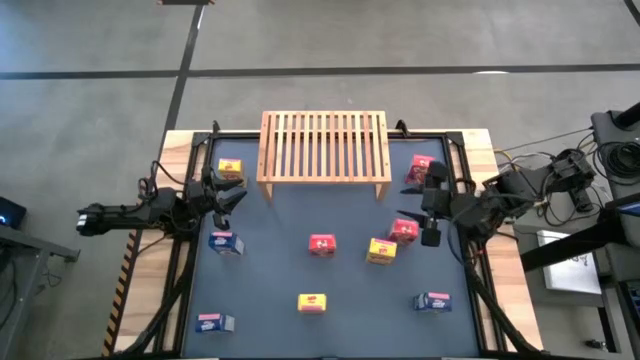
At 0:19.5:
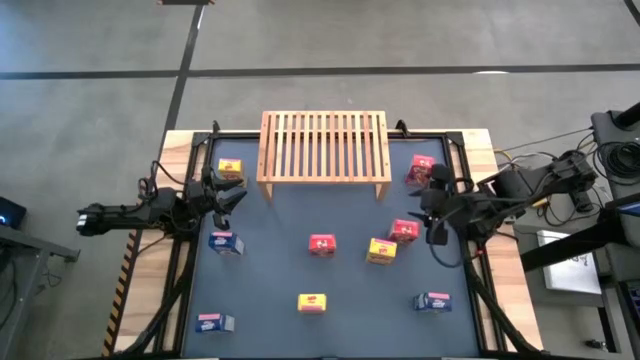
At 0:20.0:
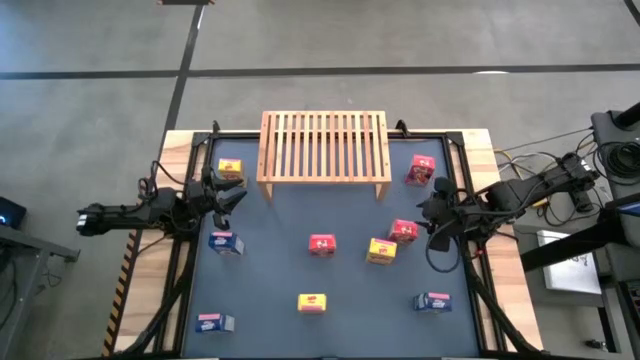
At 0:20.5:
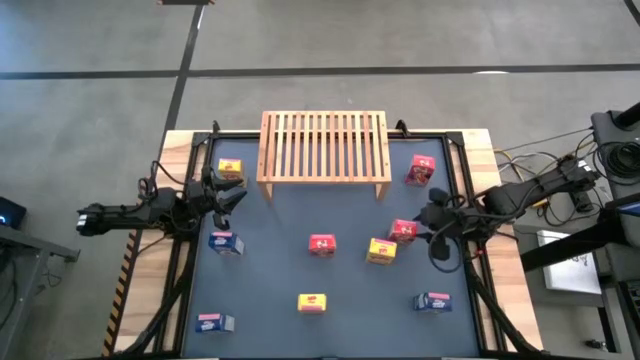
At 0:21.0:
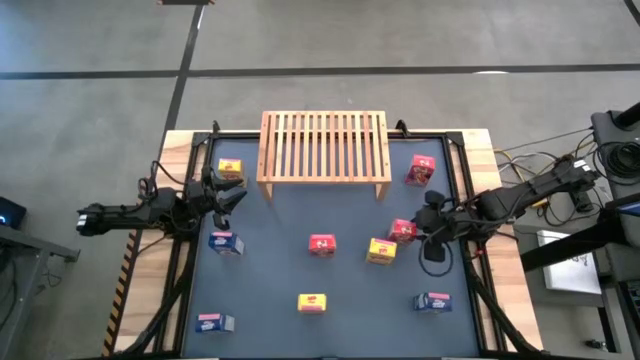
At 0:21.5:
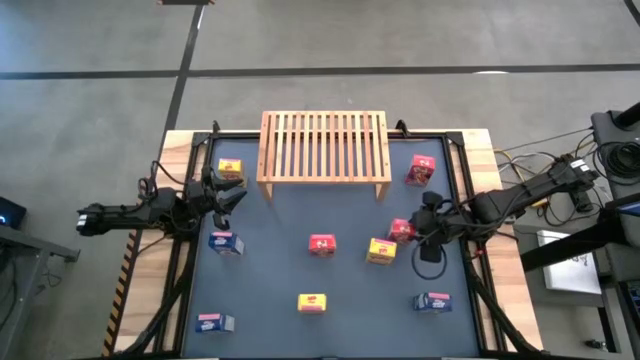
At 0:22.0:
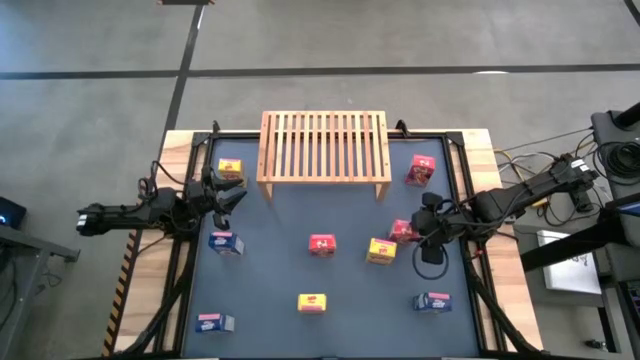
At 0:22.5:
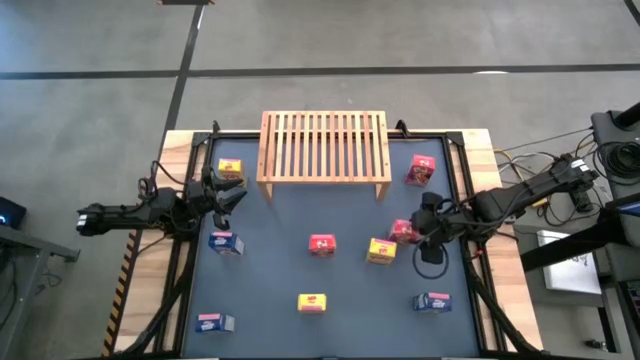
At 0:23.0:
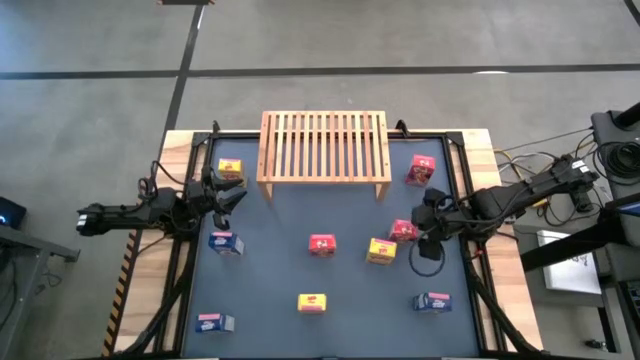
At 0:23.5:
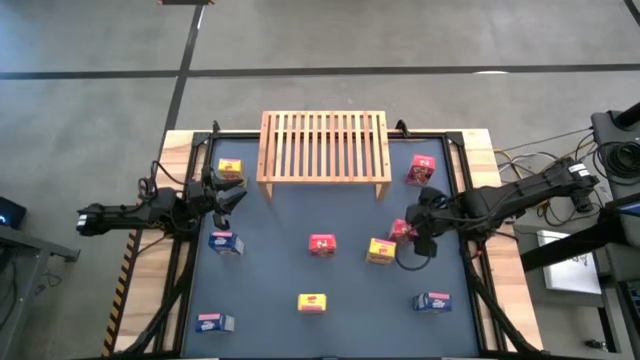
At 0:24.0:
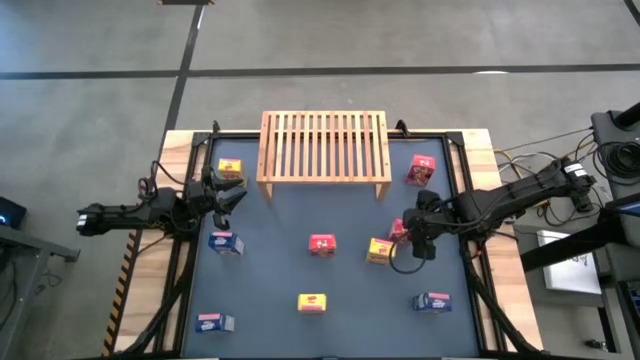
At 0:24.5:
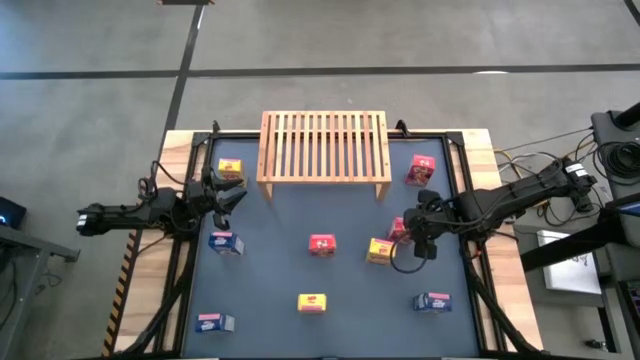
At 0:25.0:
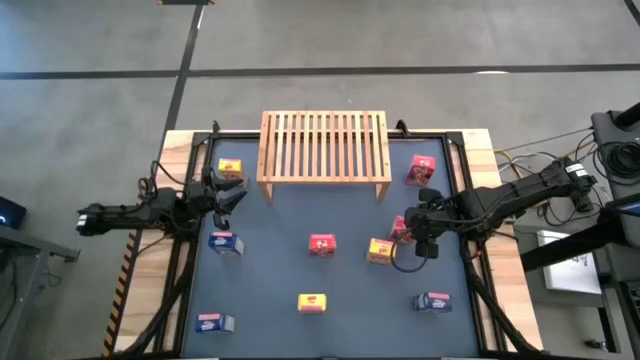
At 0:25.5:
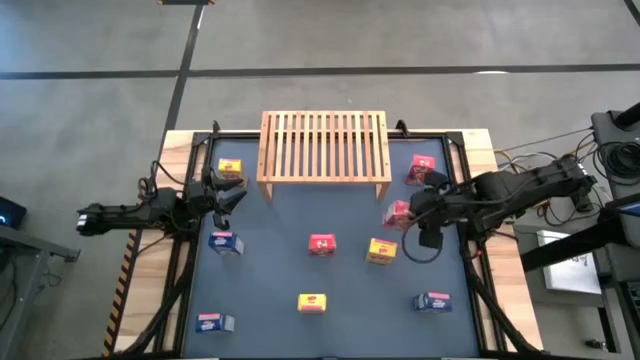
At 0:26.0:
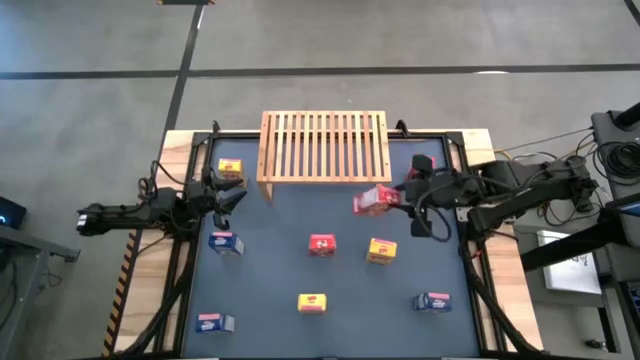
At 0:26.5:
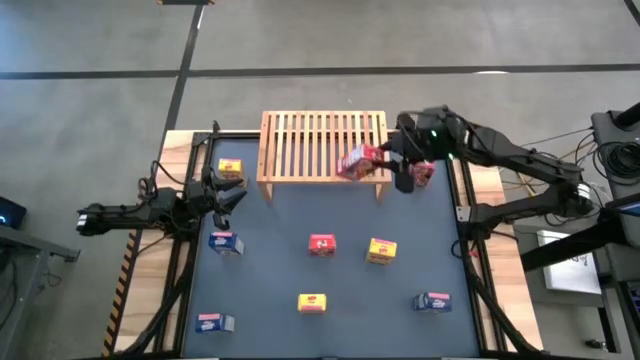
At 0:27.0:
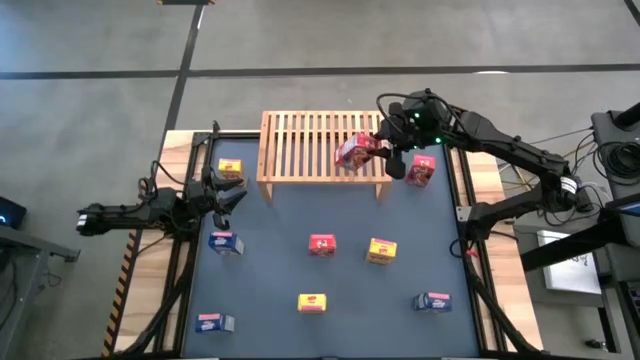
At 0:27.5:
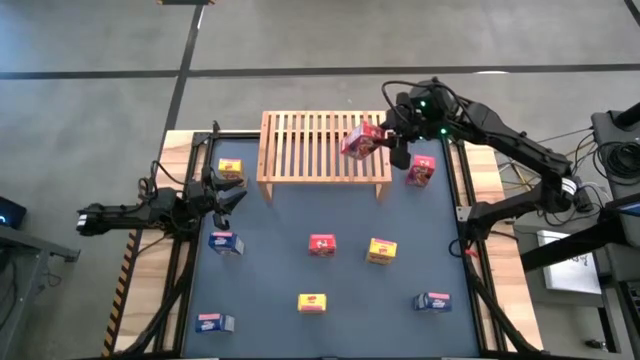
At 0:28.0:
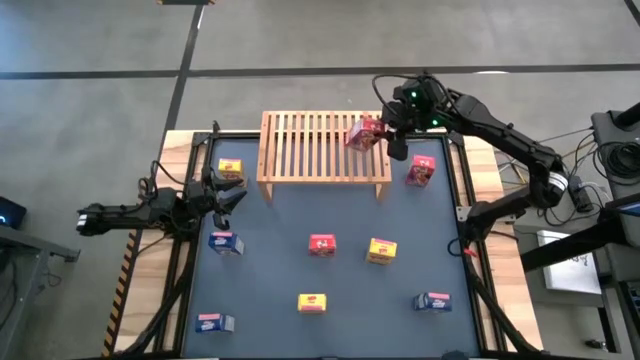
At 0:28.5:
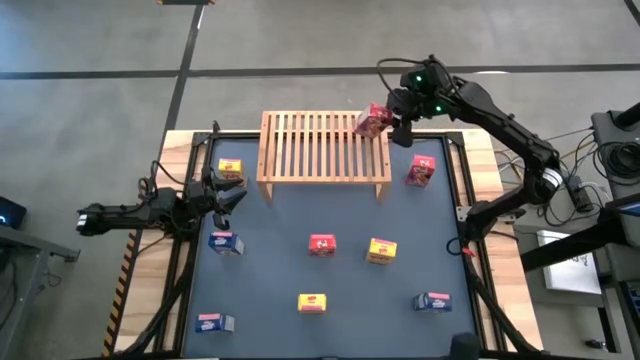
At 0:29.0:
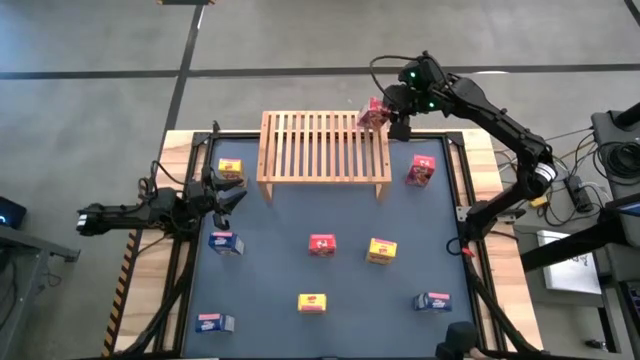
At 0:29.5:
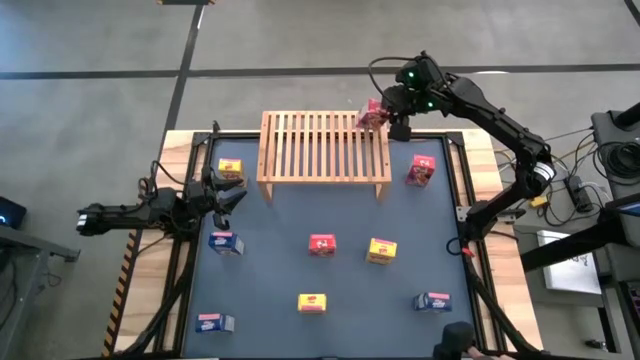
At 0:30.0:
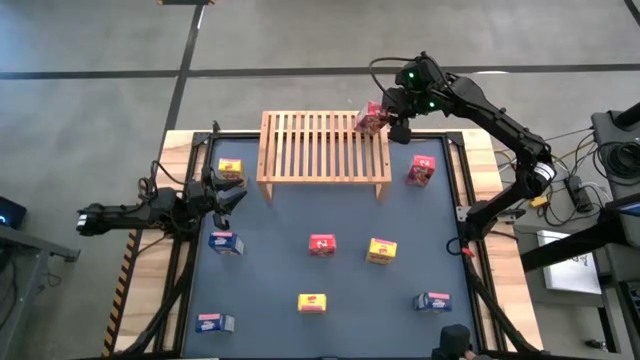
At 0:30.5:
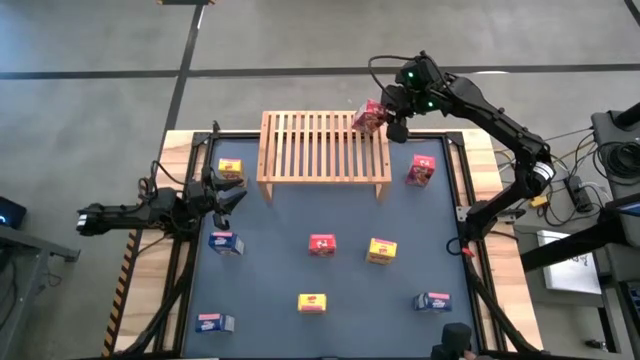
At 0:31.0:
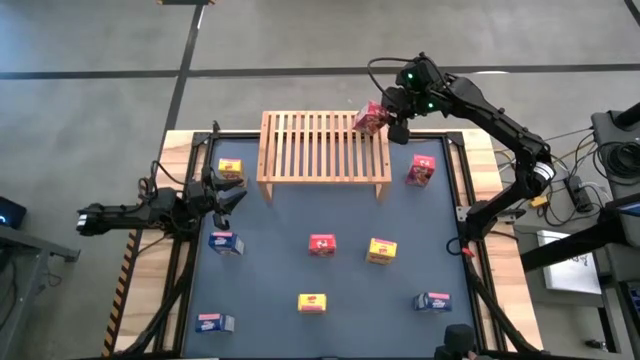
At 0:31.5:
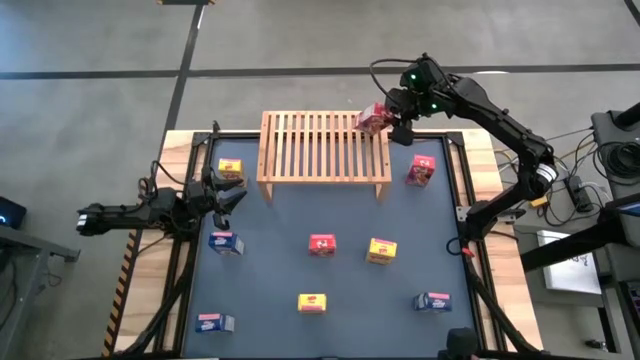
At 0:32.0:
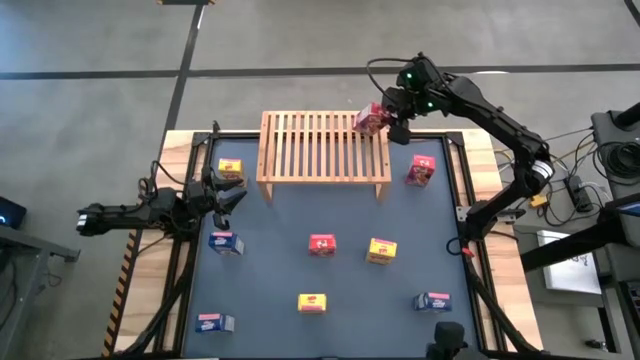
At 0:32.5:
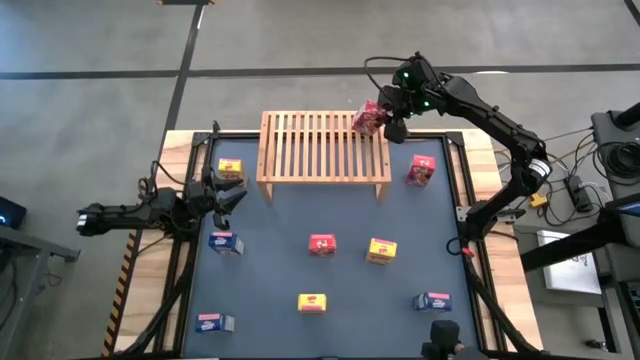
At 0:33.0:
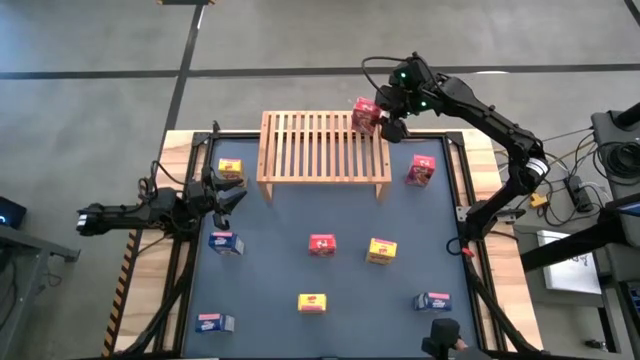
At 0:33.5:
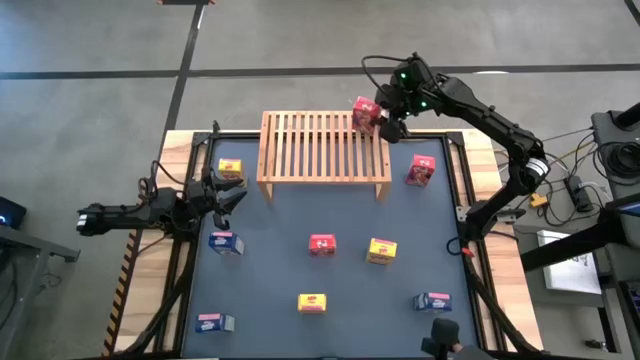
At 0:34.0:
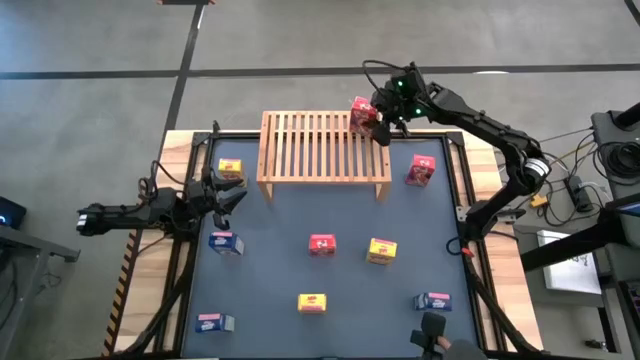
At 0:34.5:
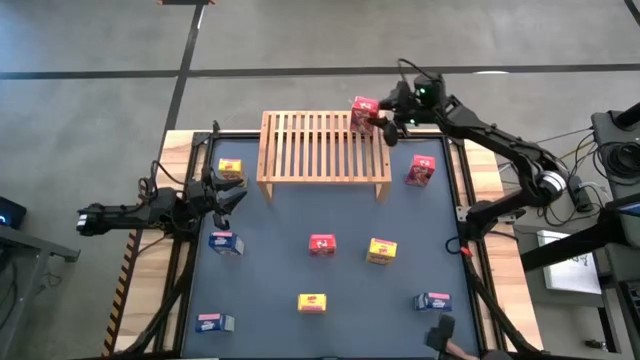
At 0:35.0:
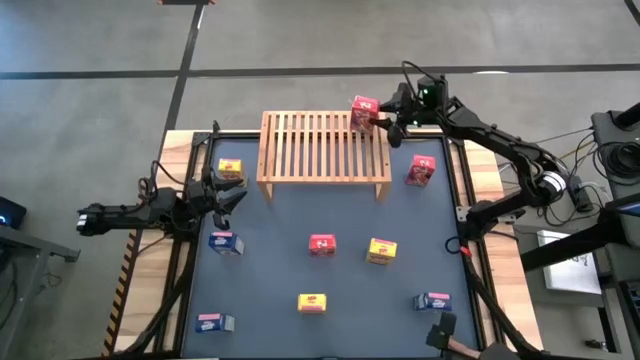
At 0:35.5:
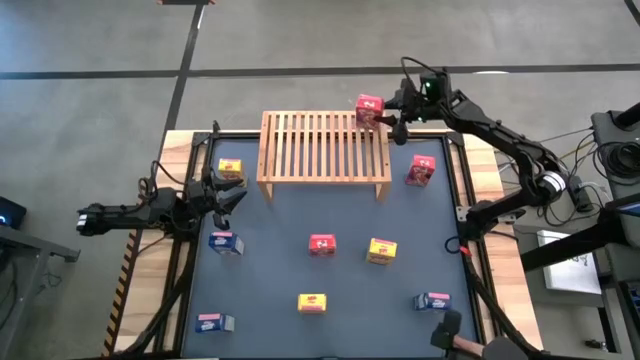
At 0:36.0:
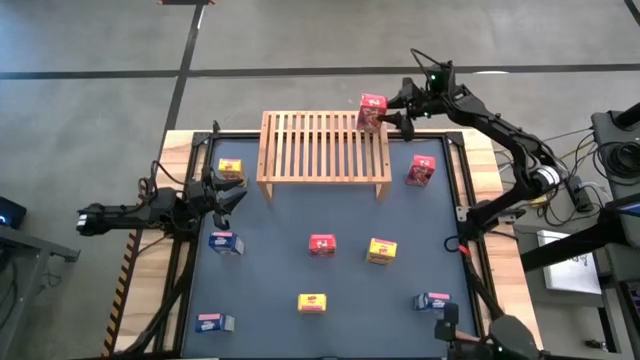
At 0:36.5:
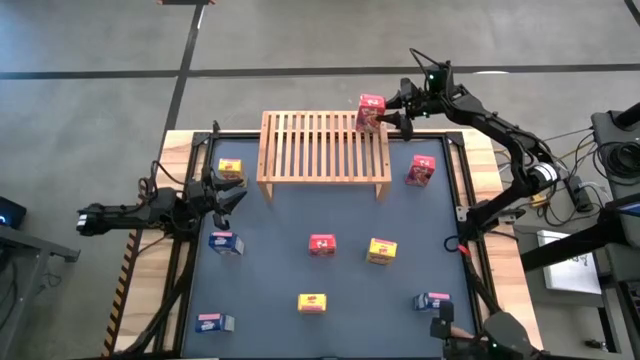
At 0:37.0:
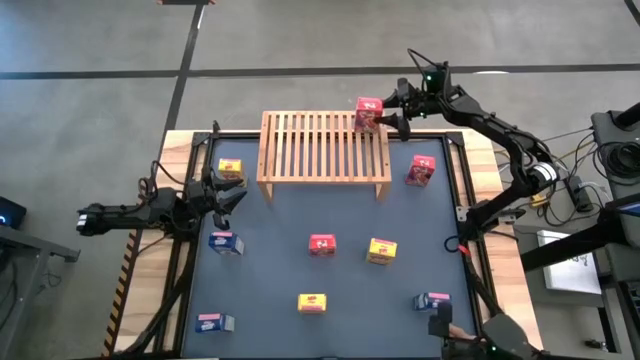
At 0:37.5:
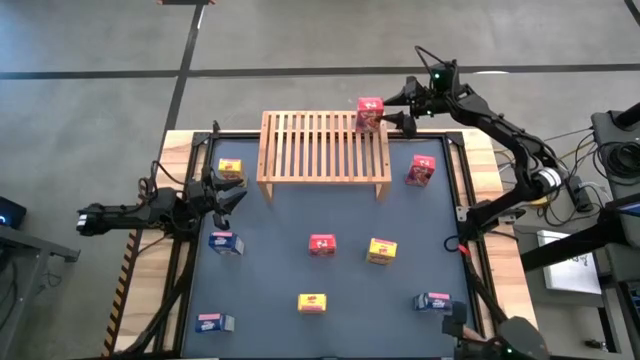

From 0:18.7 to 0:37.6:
Task: Stack cereal on shelf
Put the bottom right red cereal box on the shelf

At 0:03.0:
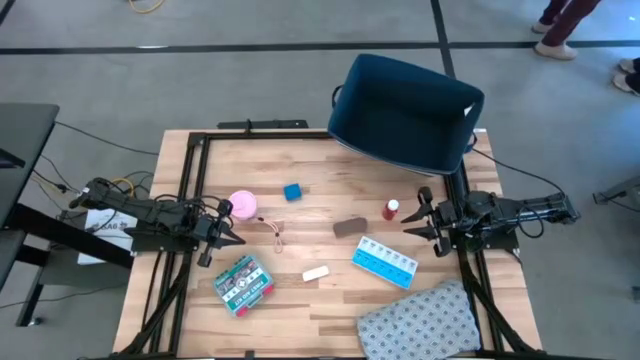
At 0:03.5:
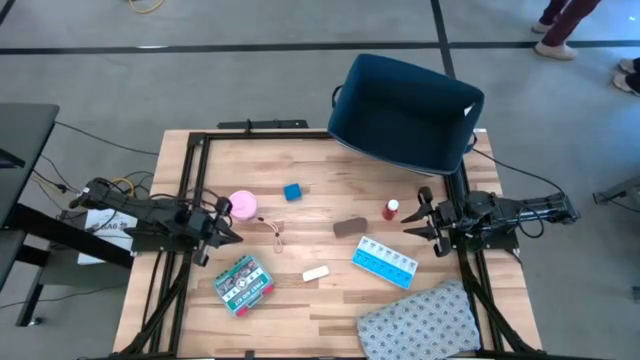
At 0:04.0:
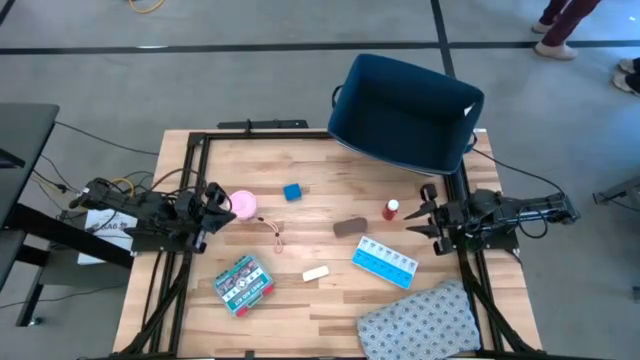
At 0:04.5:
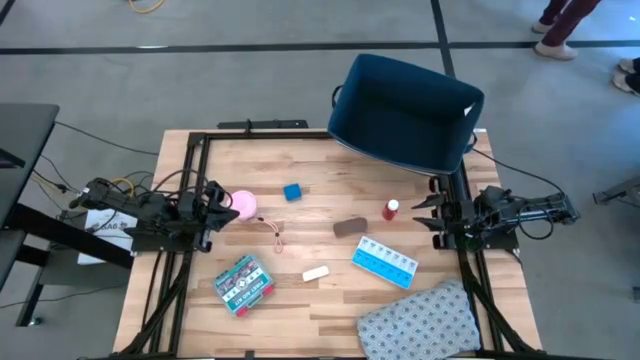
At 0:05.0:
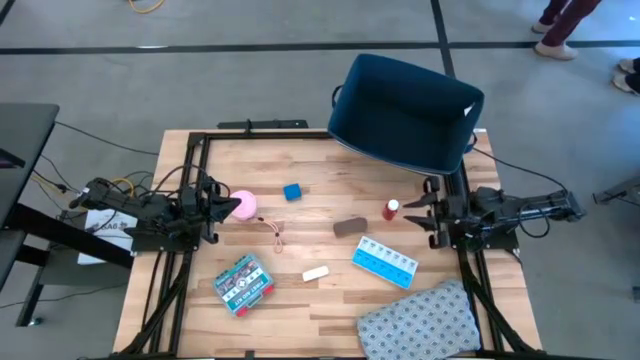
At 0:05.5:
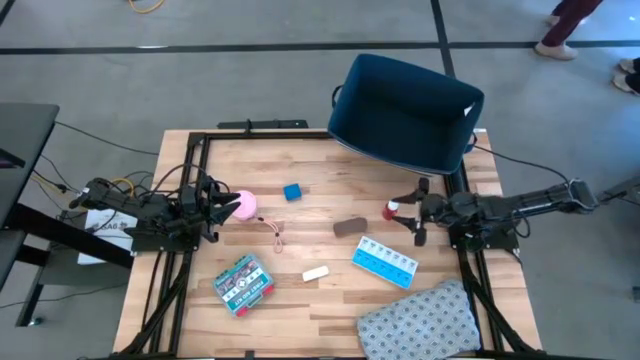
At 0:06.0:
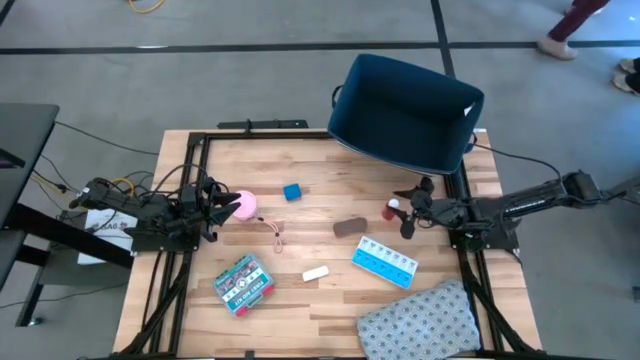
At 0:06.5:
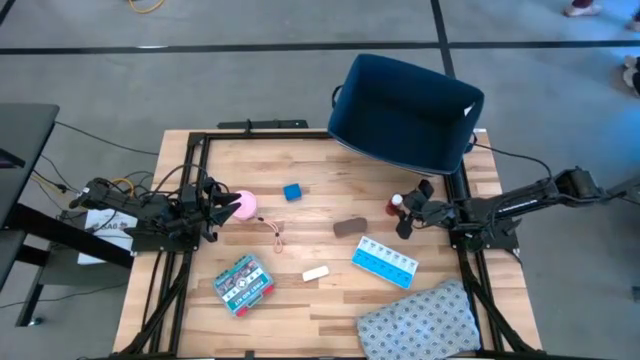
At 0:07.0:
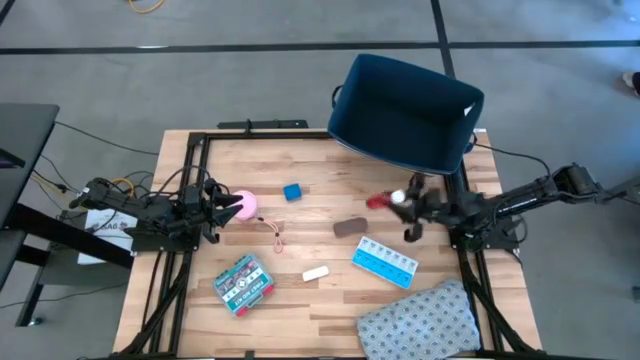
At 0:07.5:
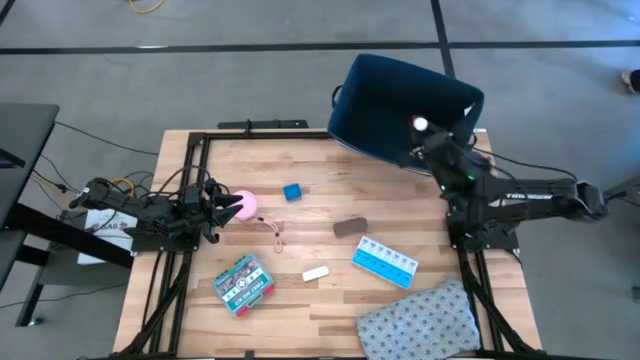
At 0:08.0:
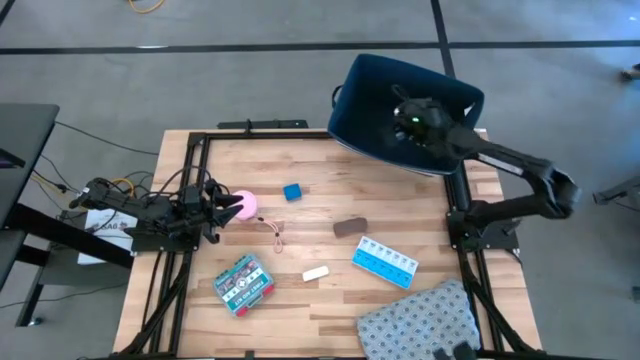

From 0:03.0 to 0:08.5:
Task: Pick & place medical supplies in basket/bin
Put the orange pill bottle into the blue bin
